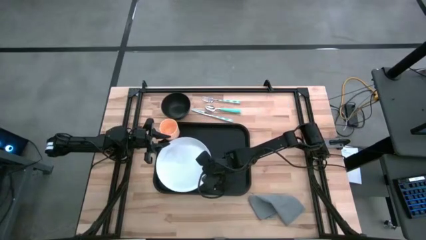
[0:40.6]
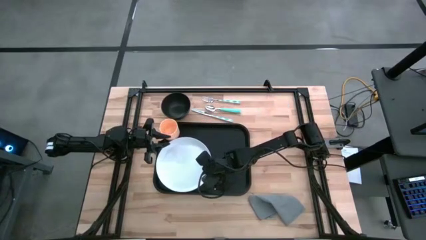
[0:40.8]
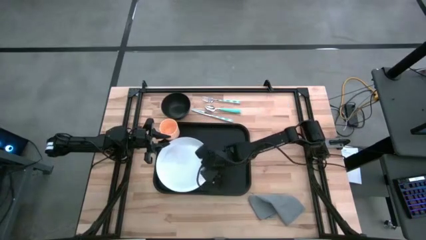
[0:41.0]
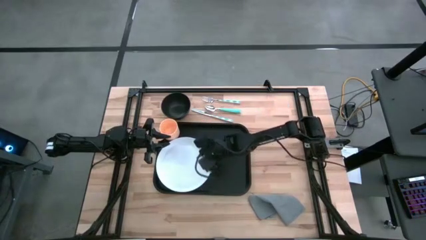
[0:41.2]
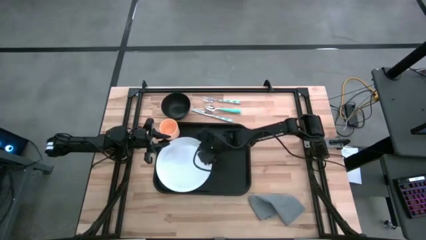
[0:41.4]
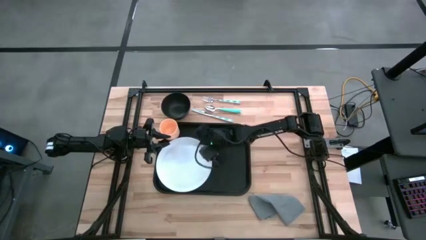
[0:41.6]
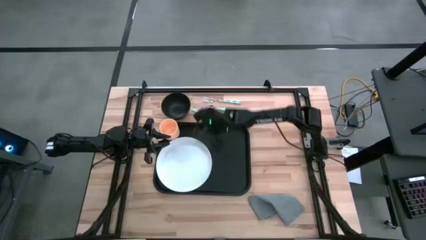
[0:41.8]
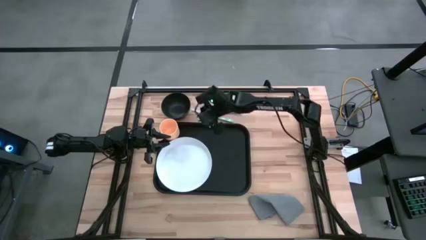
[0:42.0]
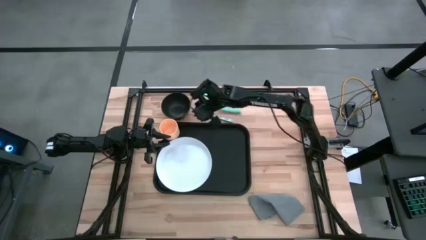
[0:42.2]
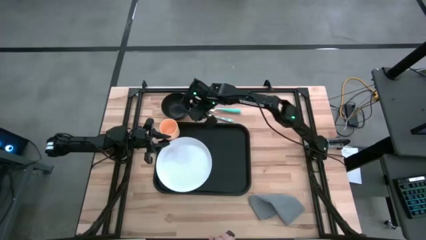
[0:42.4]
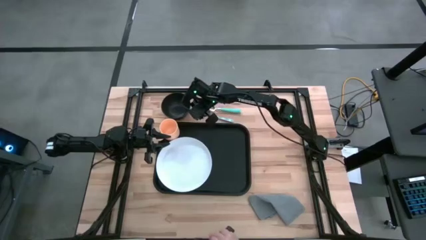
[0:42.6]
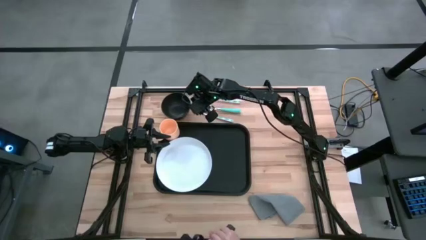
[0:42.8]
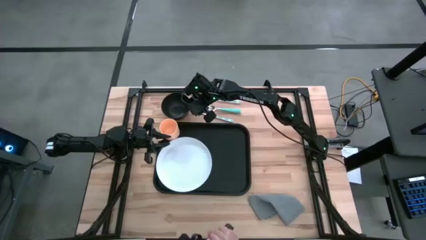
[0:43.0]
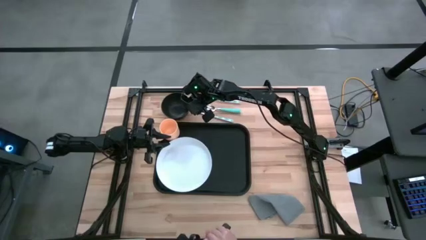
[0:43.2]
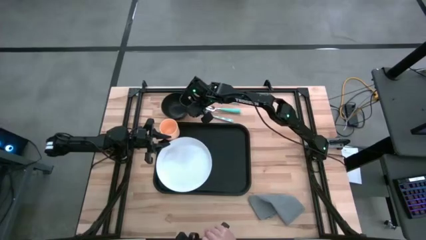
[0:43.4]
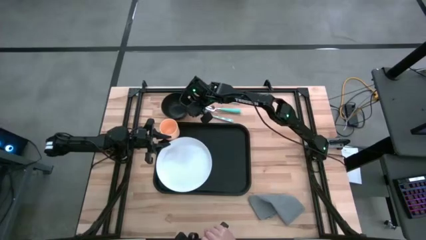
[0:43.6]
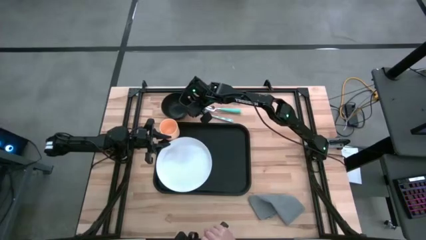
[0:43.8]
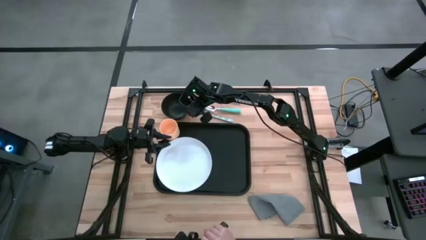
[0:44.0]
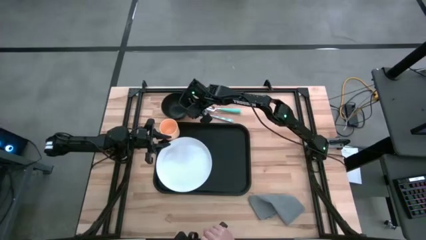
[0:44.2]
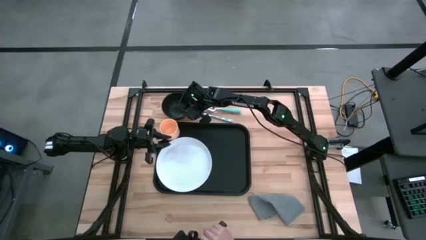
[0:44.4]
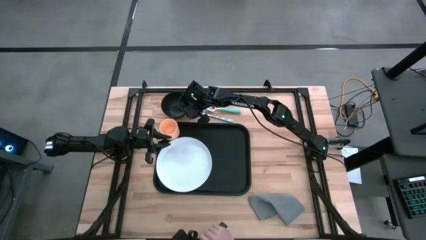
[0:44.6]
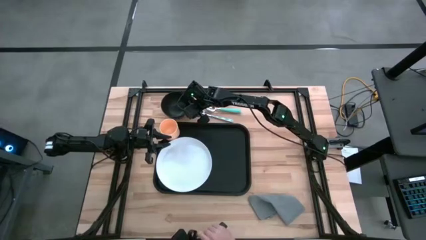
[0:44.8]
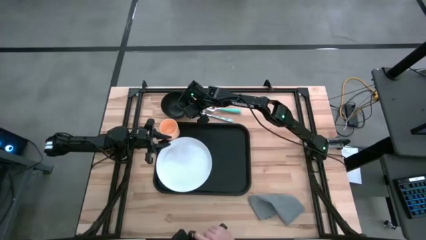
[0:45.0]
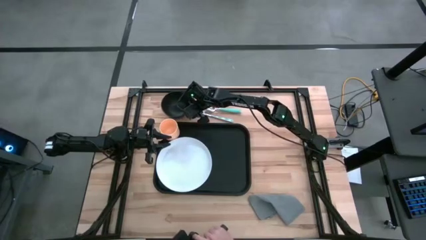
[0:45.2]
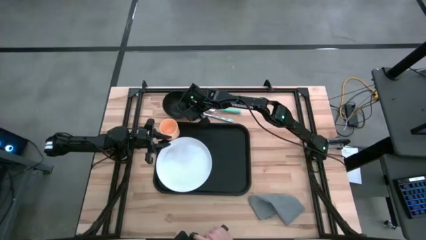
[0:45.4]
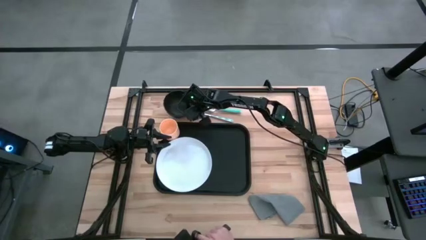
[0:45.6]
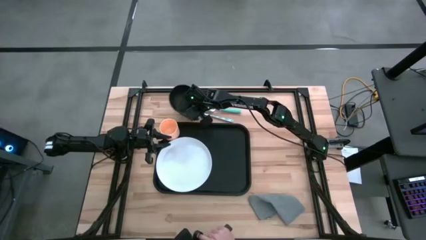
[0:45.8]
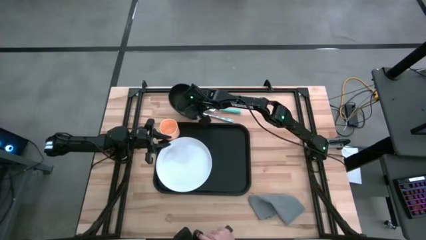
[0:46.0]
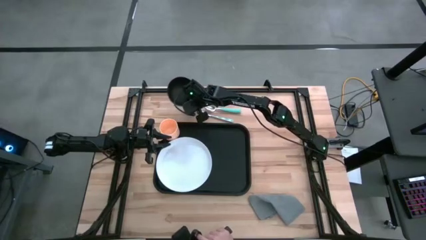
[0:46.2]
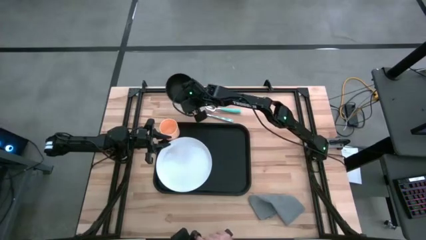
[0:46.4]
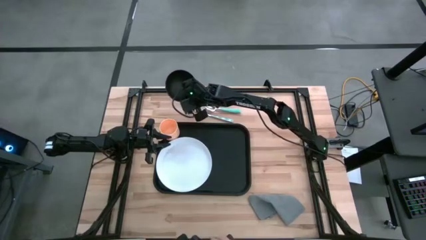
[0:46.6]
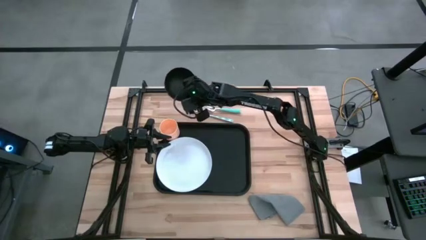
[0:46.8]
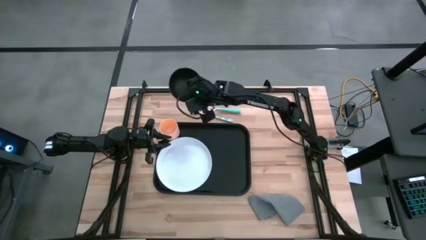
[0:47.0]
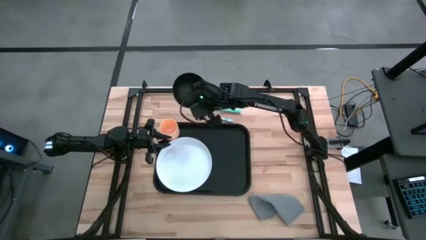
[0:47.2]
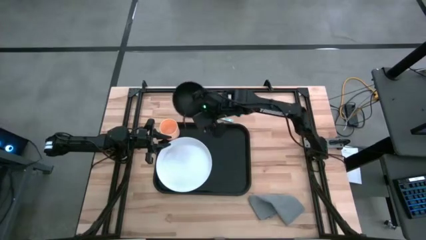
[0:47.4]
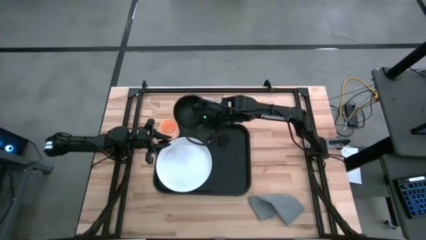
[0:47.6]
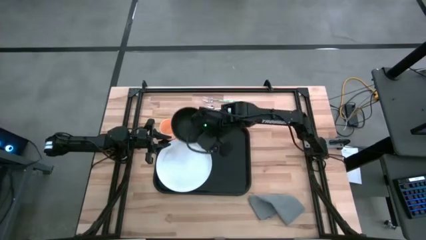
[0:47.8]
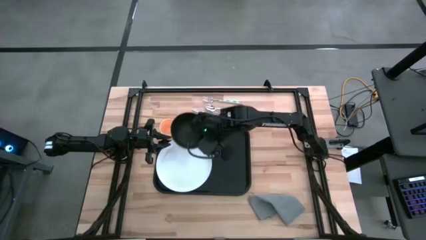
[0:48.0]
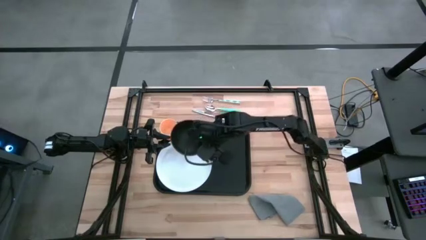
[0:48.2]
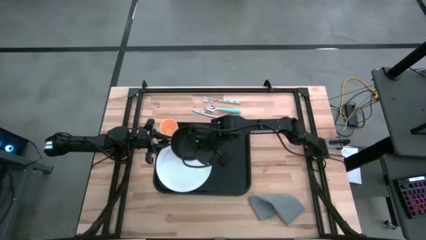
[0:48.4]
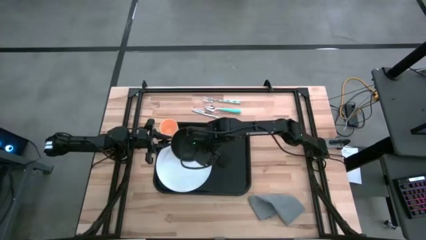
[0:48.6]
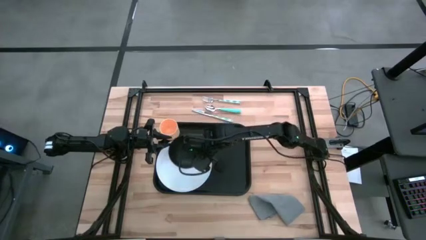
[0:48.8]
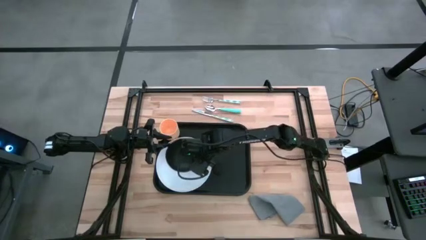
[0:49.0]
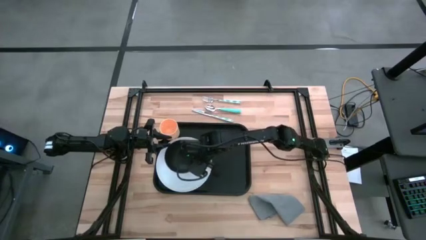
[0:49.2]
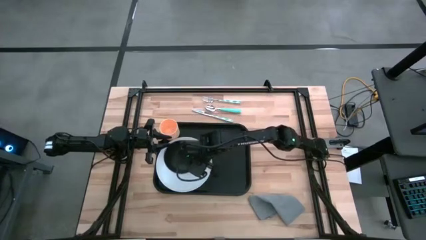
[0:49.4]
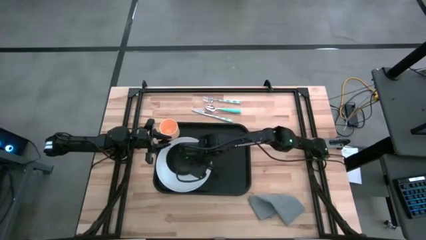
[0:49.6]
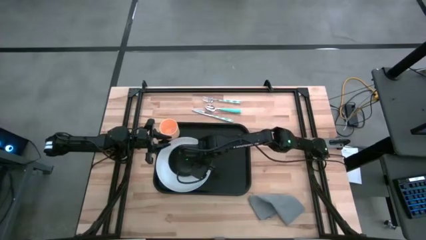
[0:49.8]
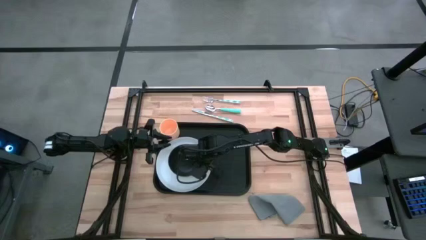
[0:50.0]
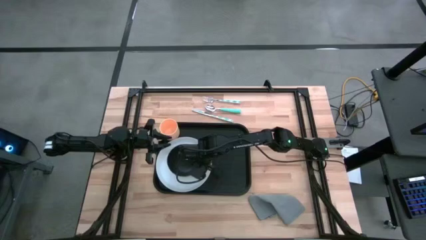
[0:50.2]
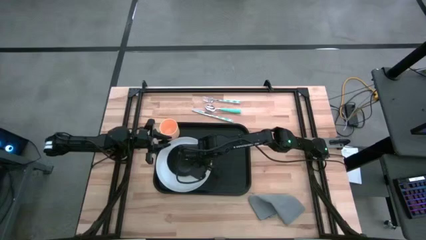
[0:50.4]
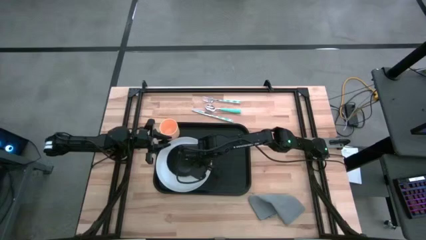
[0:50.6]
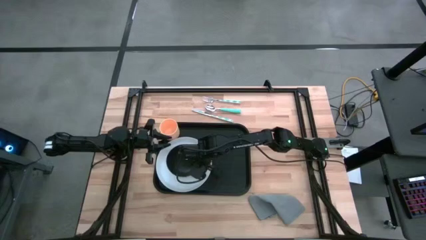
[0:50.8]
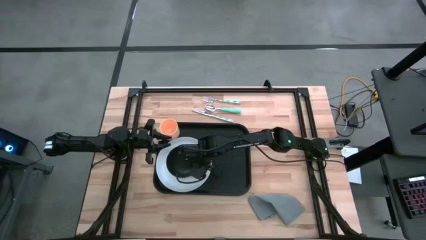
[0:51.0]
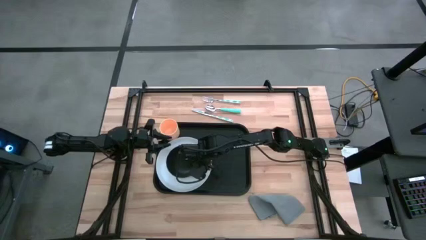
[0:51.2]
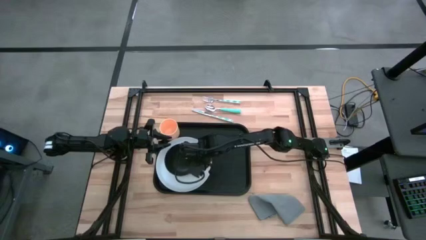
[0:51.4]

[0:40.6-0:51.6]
Task: Set up tray
Put the black bowl on the white plate
